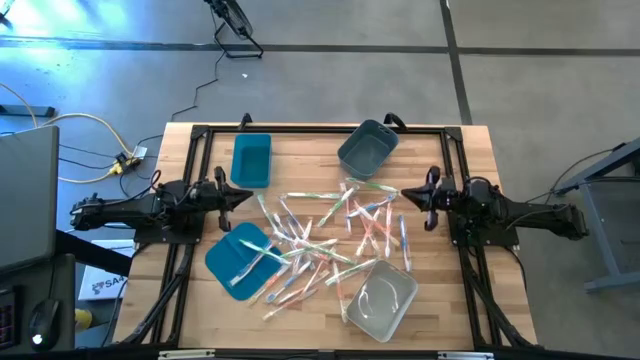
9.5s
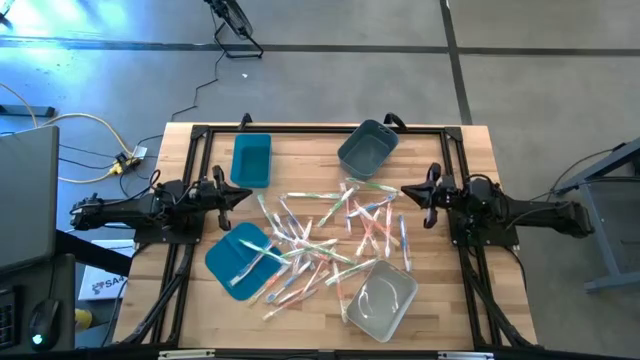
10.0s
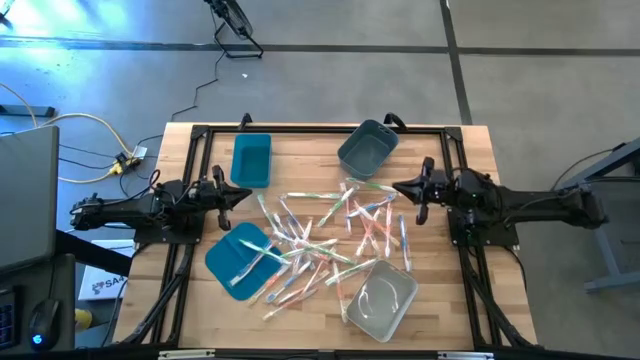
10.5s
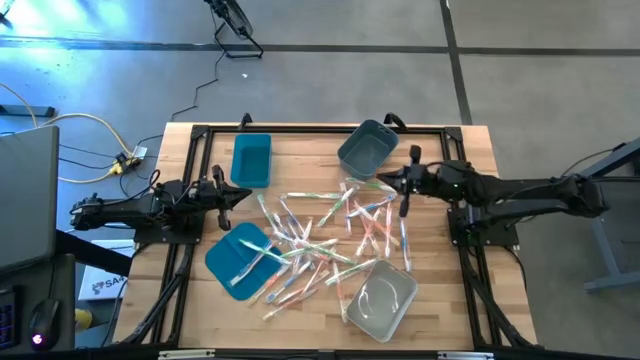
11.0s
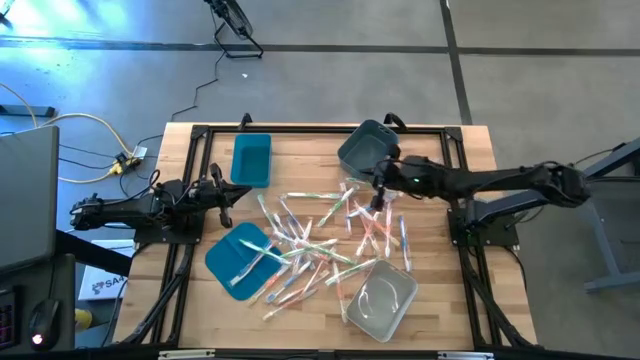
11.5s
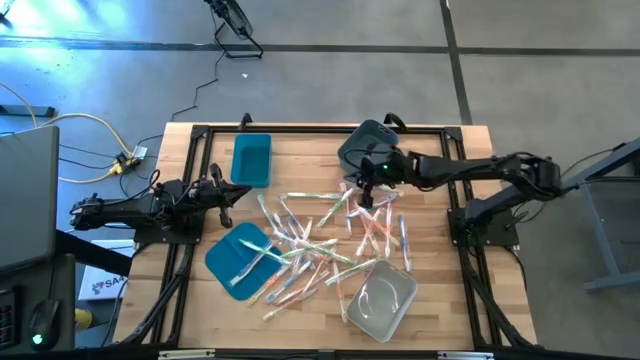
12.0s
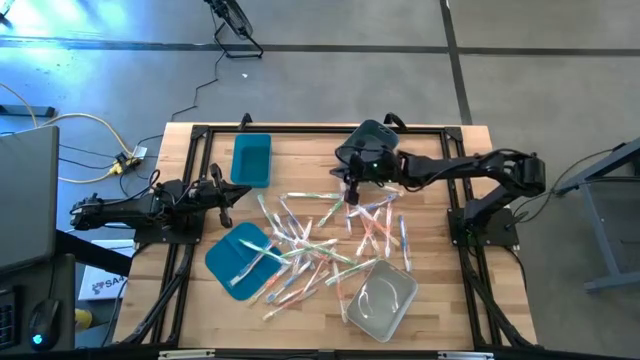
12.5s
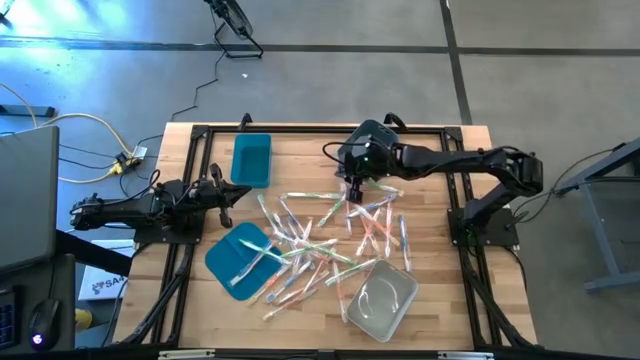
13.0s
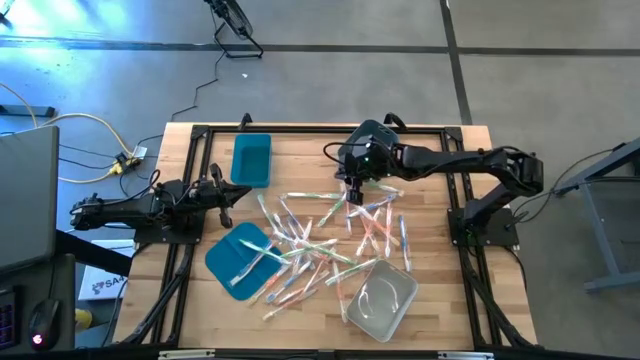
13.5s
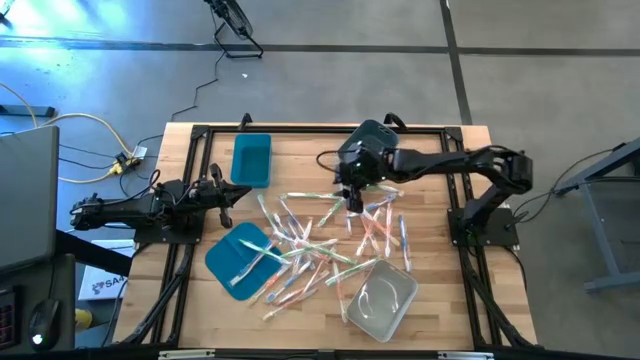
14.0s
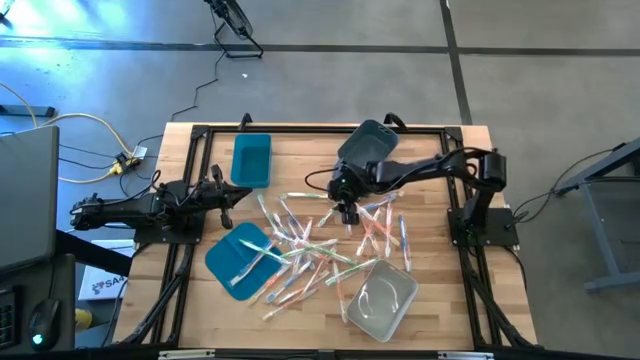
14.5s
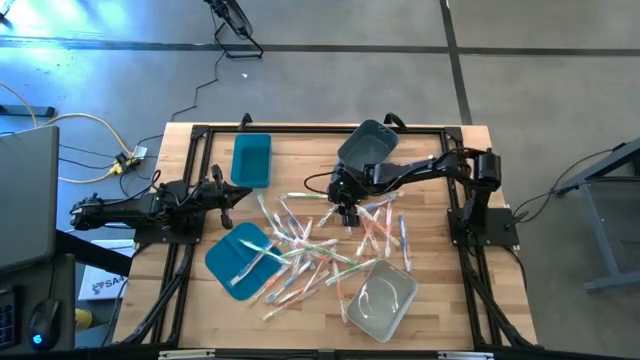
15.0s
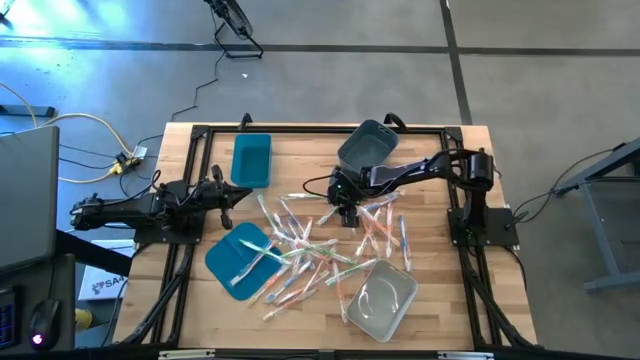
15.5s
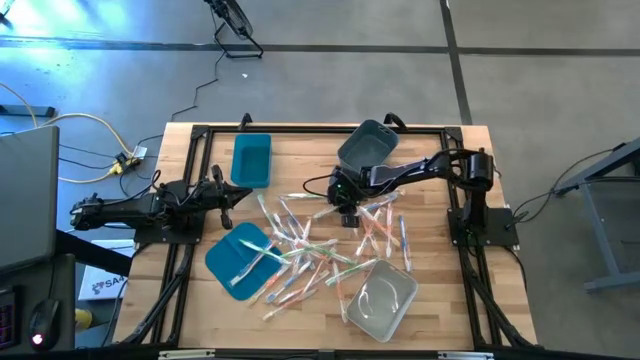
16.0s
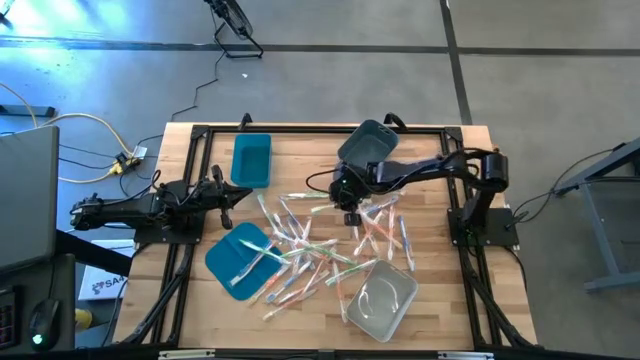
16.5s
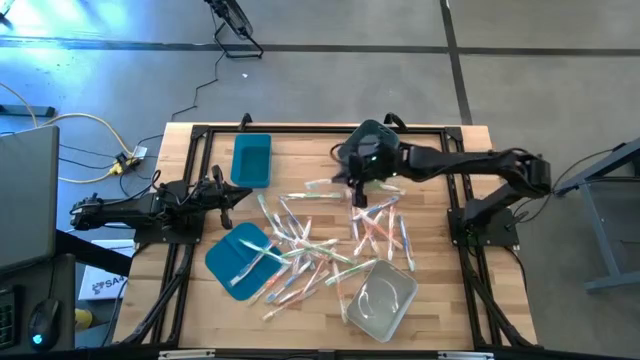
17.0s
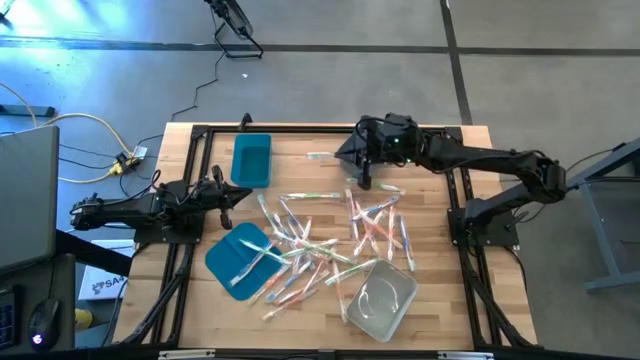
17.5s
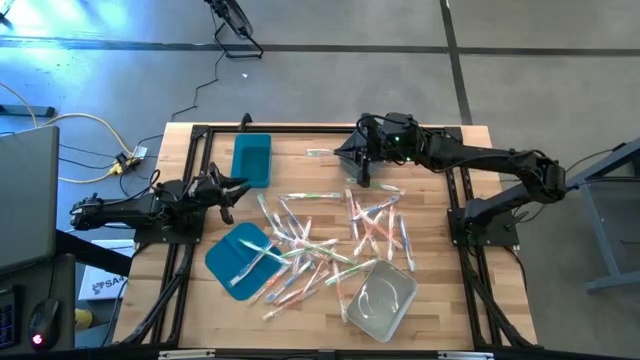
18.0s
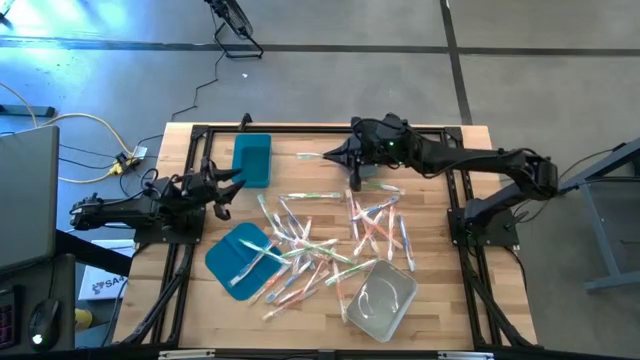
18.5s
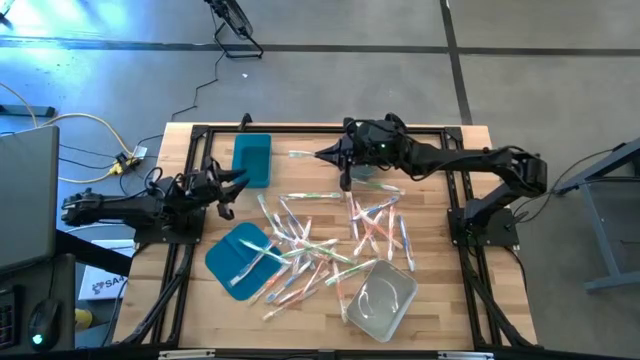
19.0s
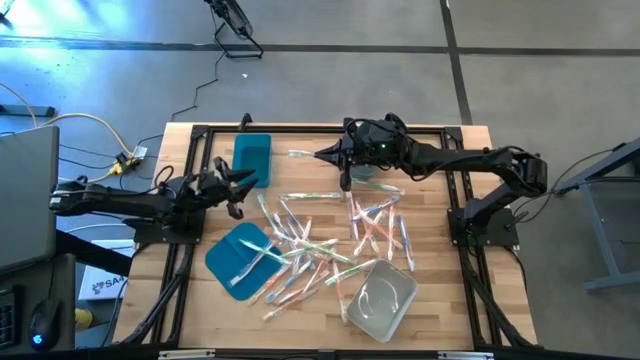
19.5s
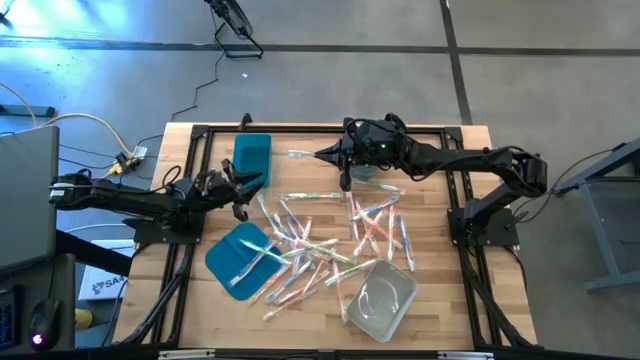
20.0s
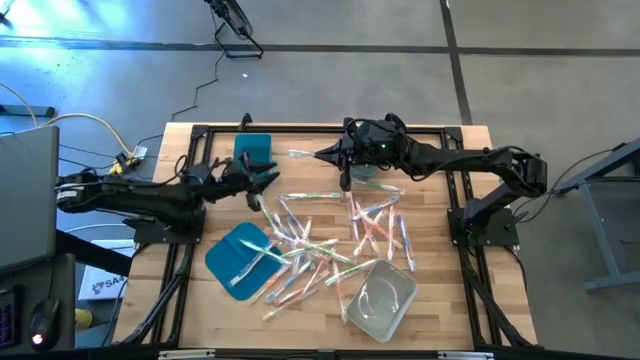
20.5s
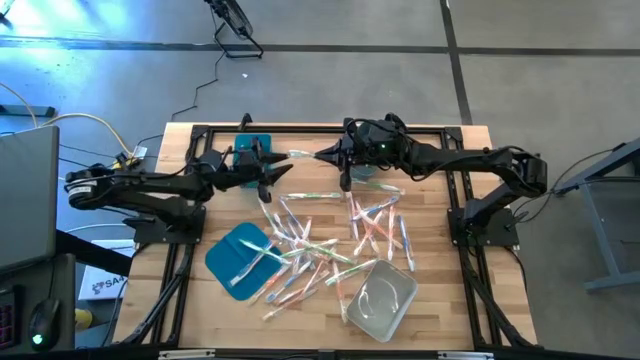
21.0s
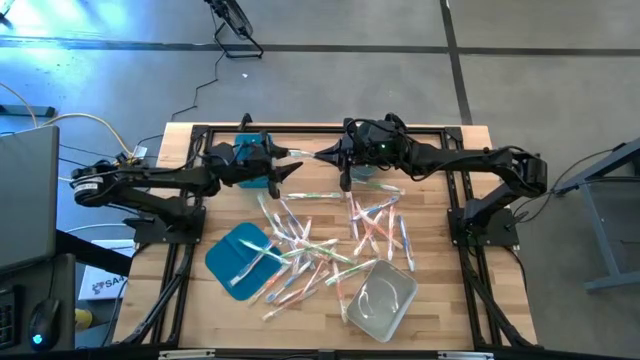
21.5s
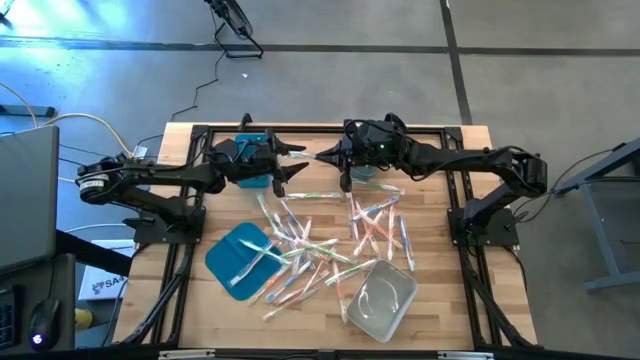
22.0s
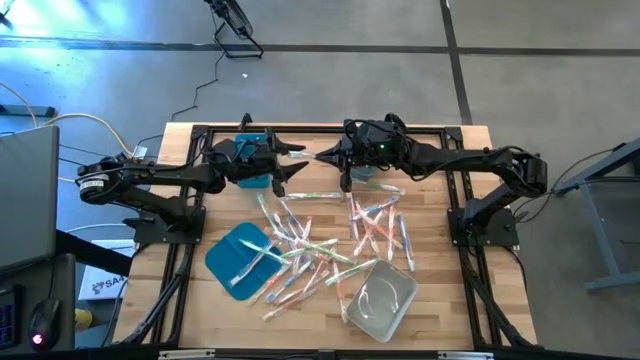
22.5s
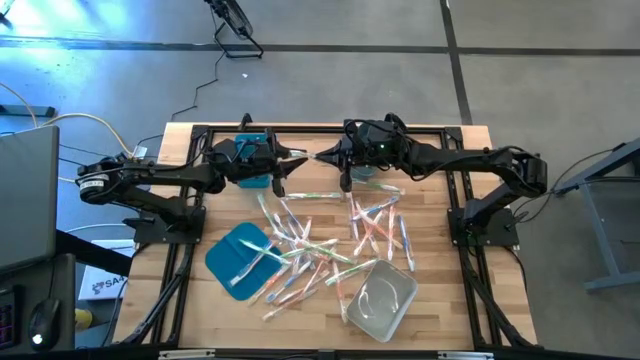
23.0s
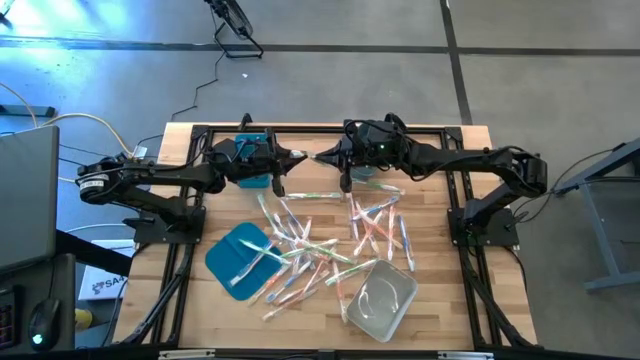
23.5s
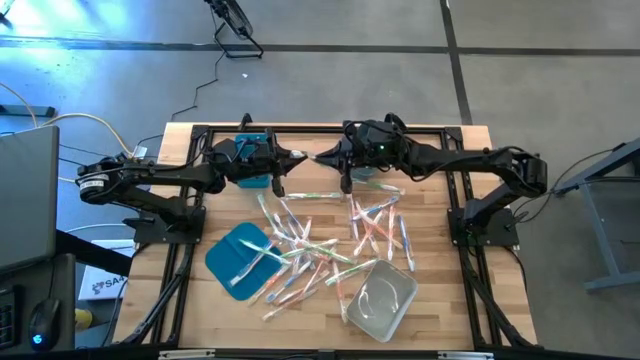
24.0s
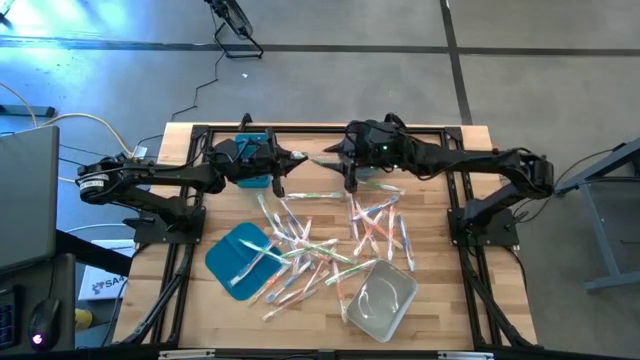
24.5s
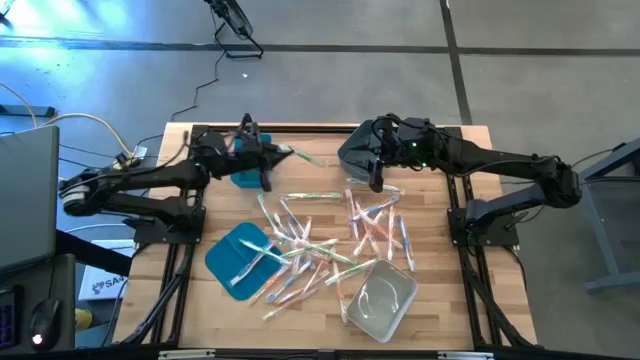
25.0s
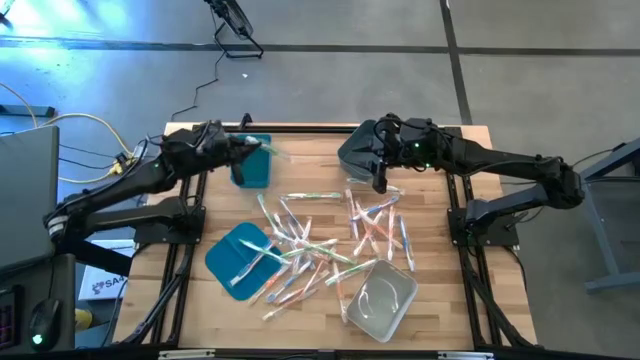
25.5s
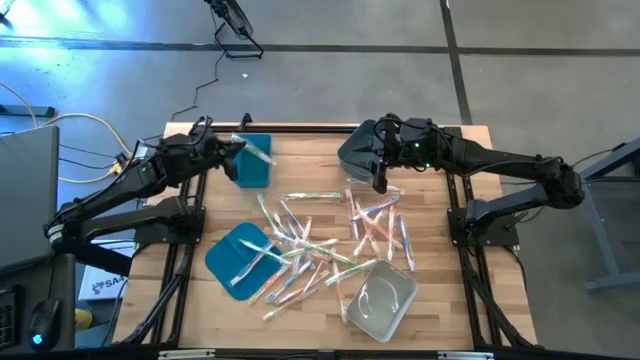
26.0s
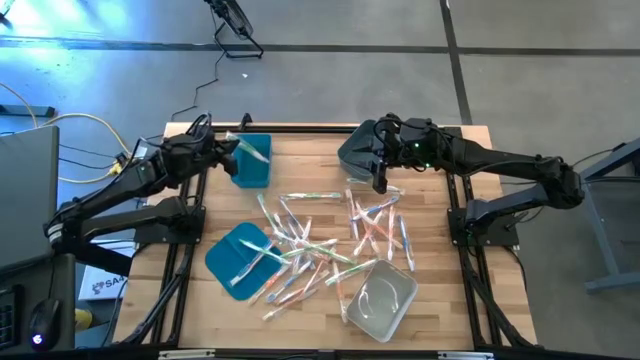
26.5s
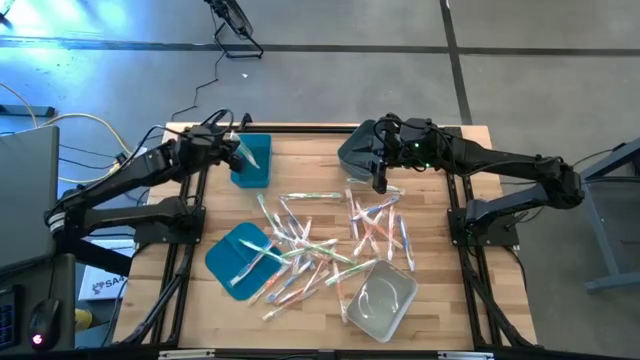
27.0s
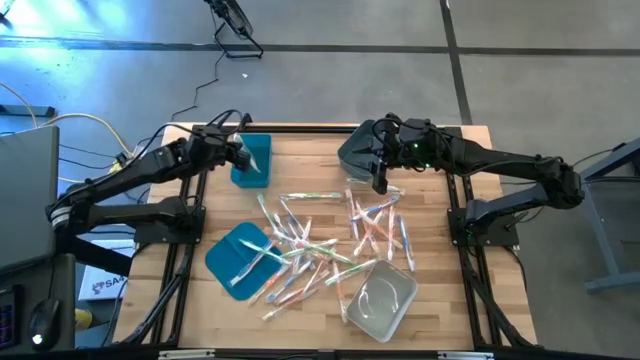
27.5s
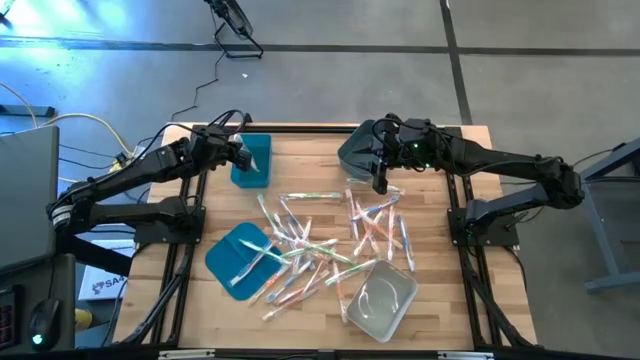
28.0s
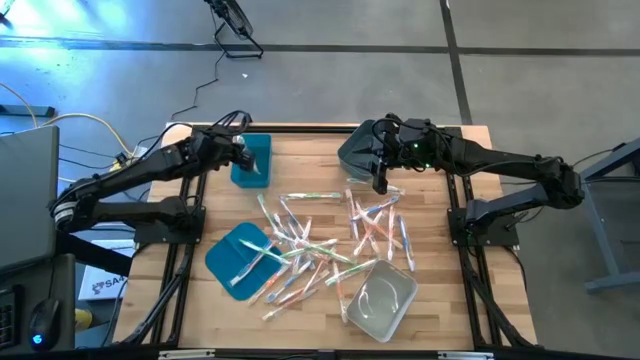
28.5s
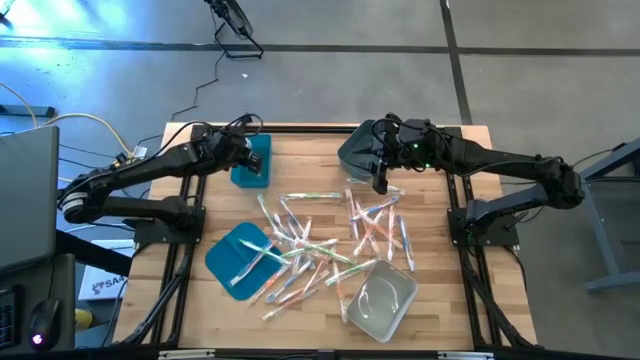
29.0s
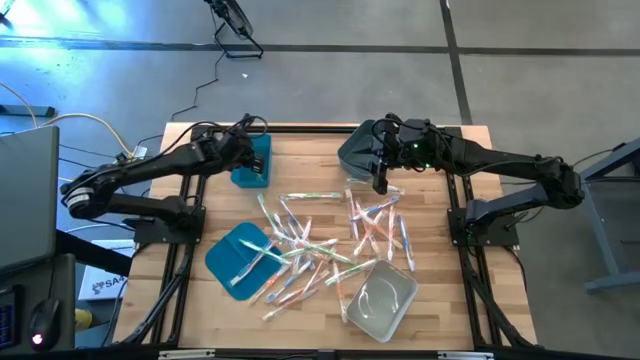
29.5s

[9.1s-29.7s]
Task: Pick & Place Toothbrushes
Put the green toothbrush into the blue bin
